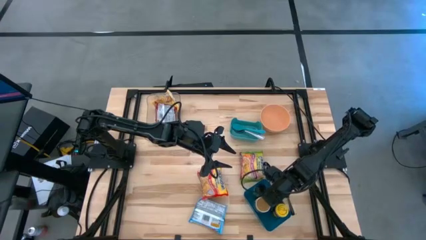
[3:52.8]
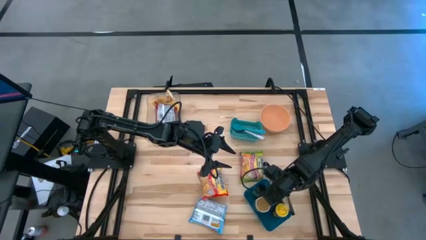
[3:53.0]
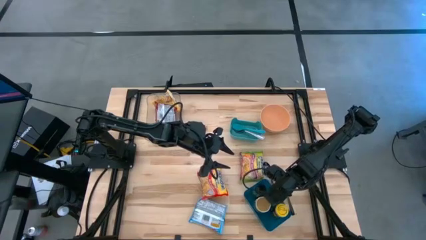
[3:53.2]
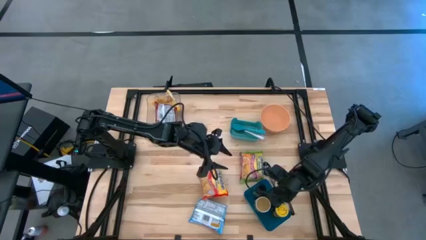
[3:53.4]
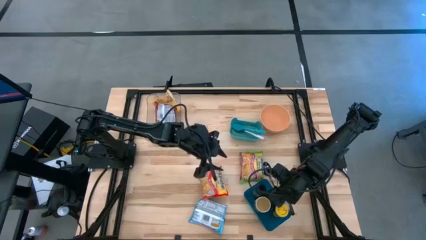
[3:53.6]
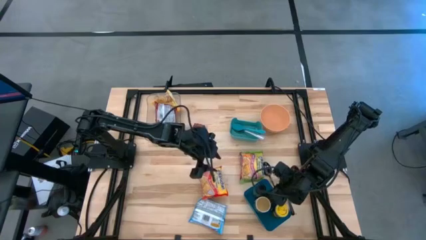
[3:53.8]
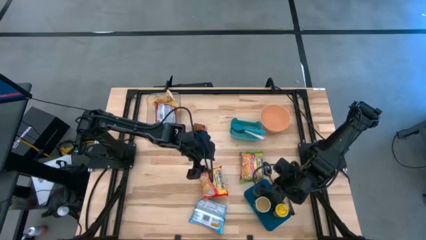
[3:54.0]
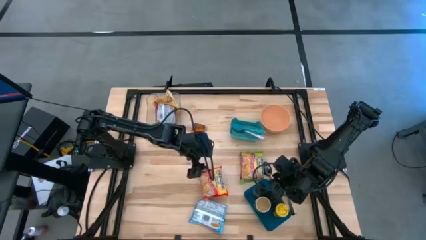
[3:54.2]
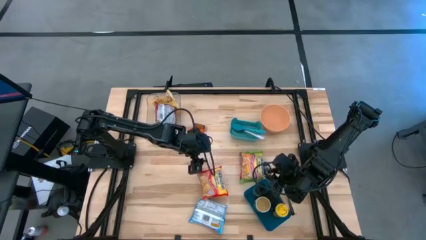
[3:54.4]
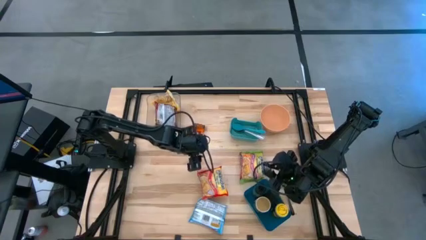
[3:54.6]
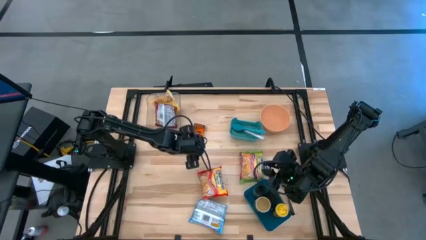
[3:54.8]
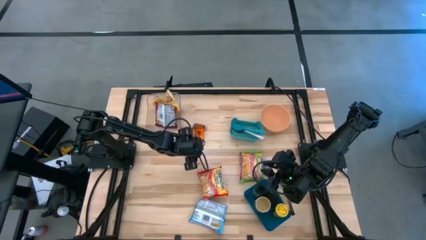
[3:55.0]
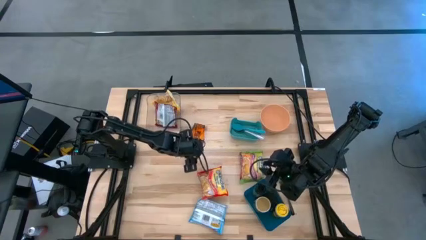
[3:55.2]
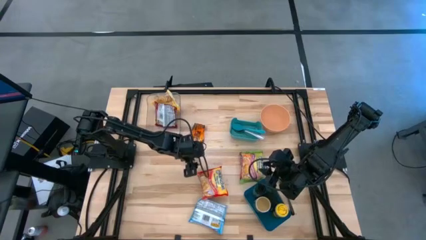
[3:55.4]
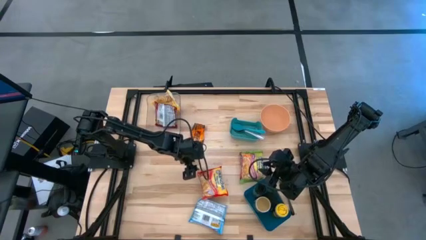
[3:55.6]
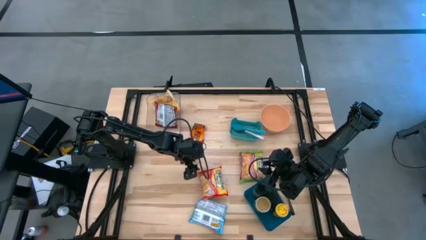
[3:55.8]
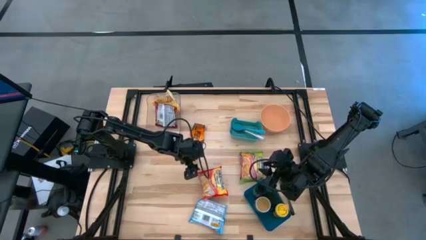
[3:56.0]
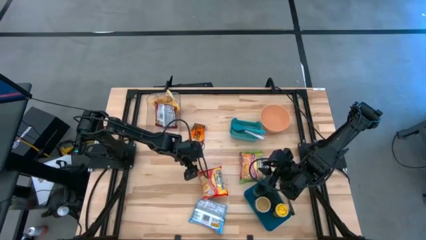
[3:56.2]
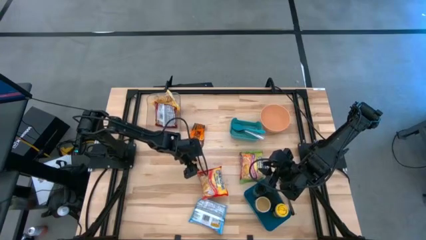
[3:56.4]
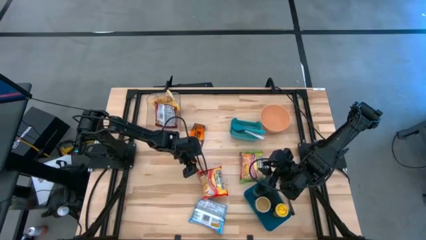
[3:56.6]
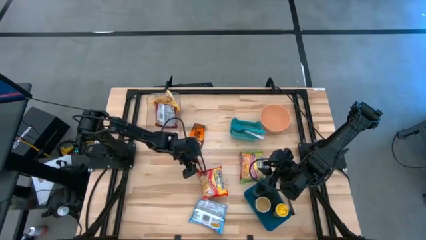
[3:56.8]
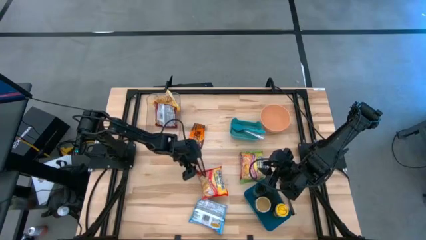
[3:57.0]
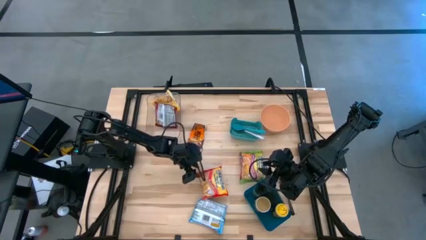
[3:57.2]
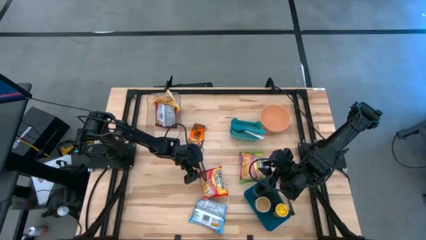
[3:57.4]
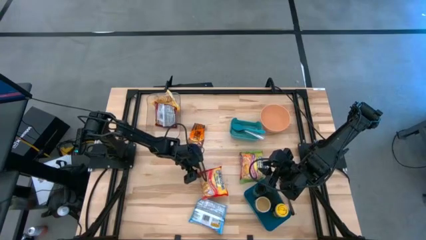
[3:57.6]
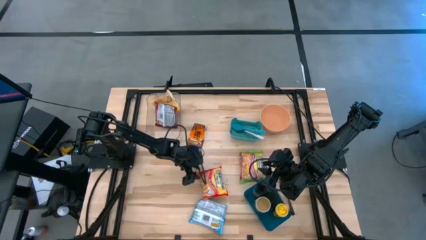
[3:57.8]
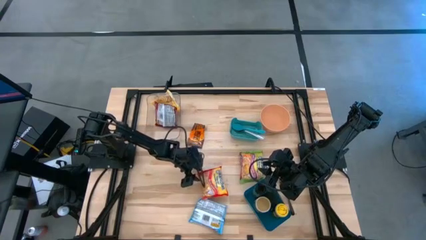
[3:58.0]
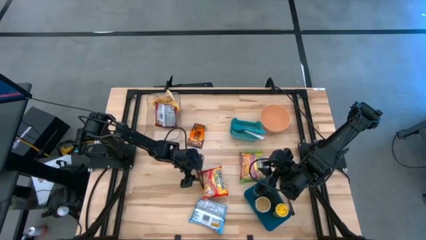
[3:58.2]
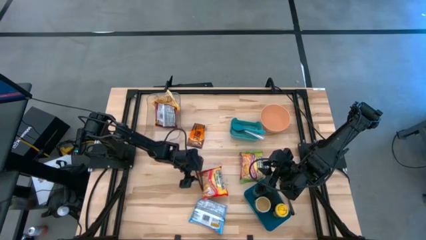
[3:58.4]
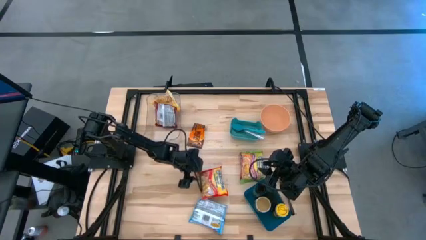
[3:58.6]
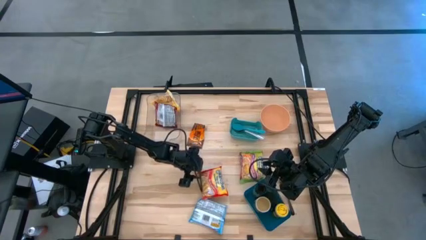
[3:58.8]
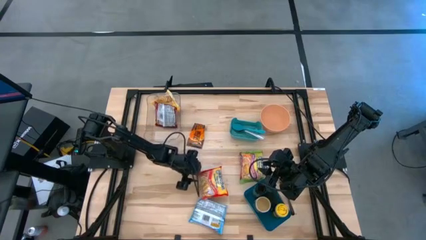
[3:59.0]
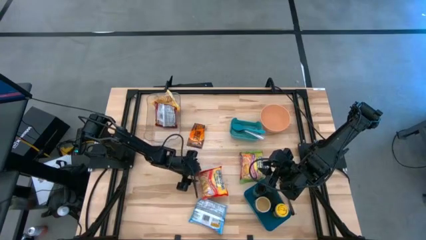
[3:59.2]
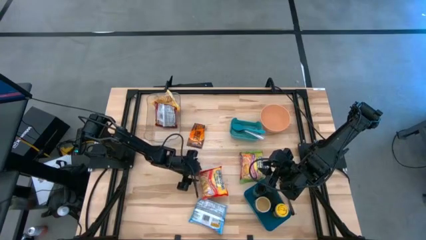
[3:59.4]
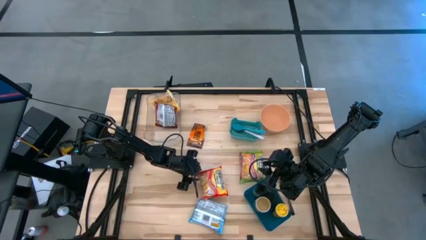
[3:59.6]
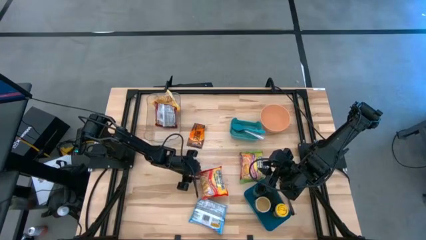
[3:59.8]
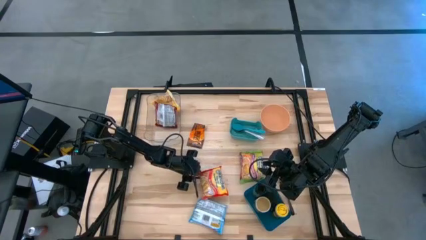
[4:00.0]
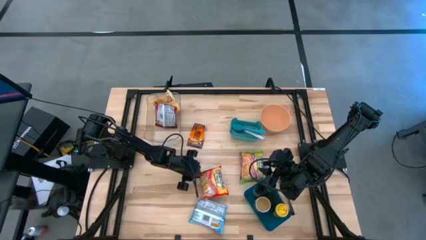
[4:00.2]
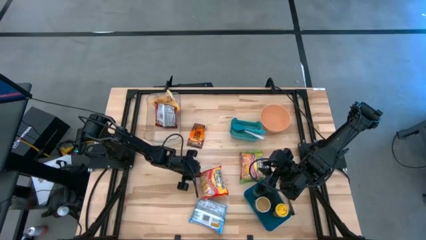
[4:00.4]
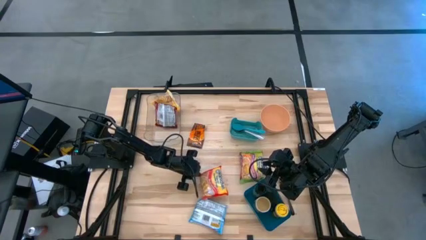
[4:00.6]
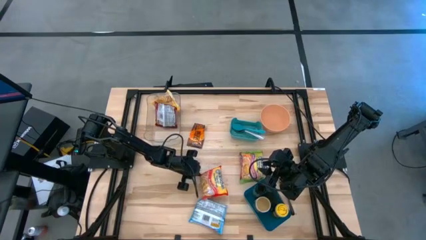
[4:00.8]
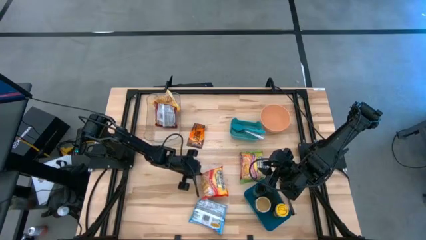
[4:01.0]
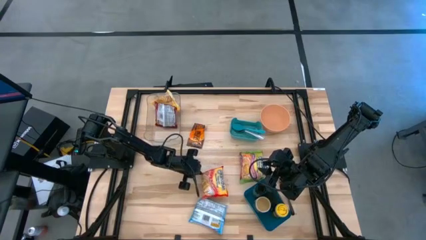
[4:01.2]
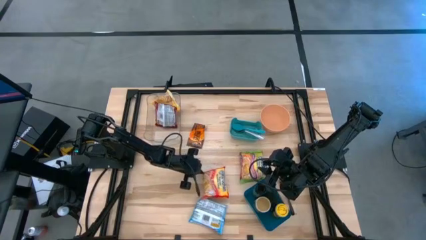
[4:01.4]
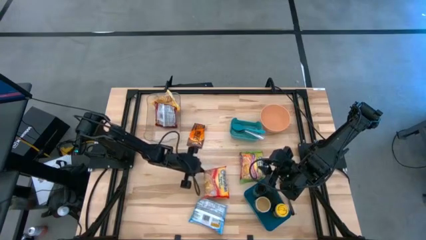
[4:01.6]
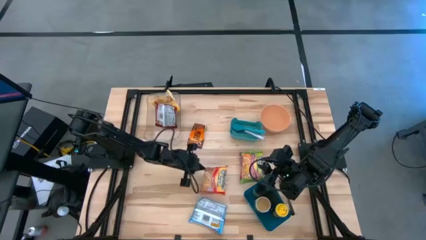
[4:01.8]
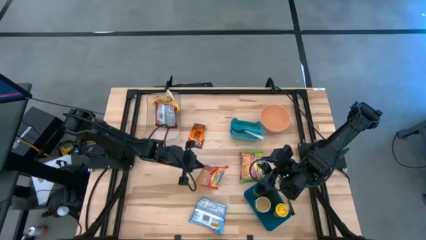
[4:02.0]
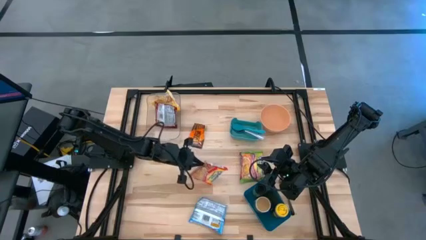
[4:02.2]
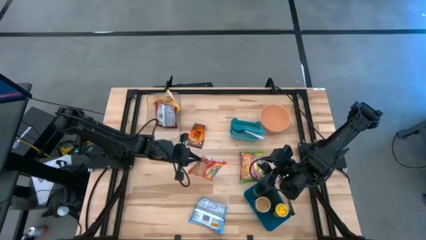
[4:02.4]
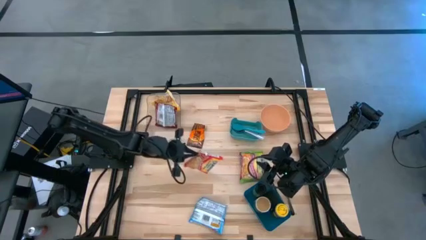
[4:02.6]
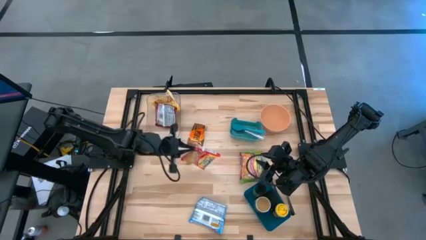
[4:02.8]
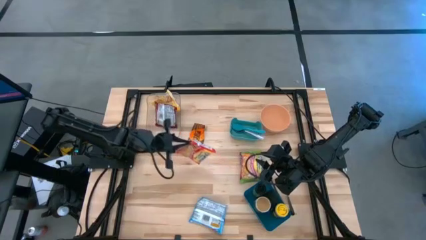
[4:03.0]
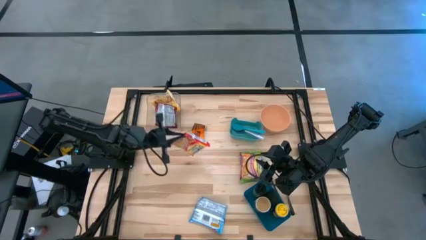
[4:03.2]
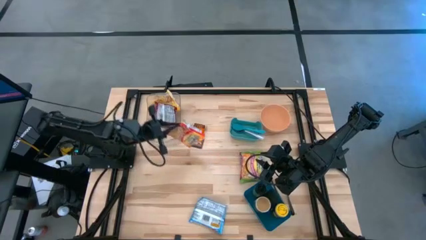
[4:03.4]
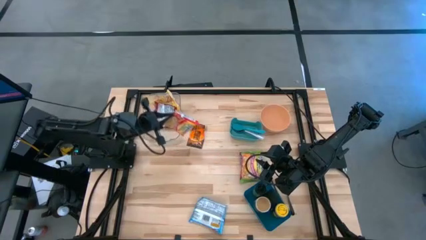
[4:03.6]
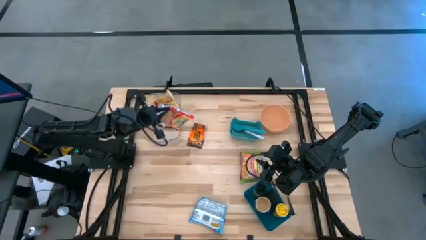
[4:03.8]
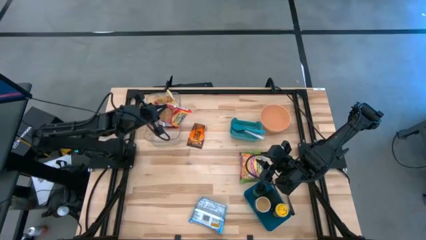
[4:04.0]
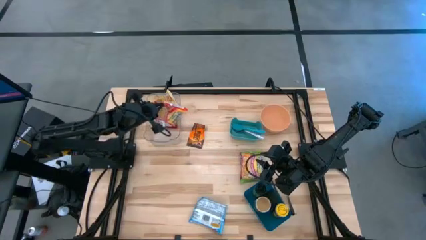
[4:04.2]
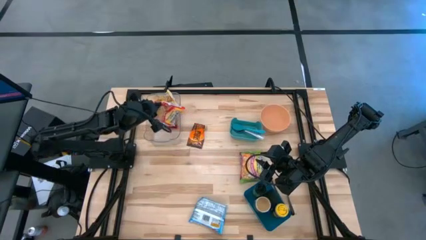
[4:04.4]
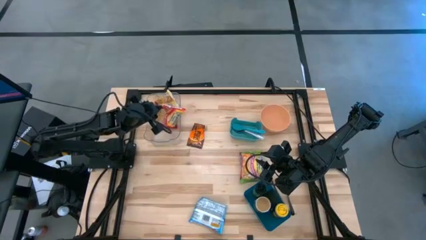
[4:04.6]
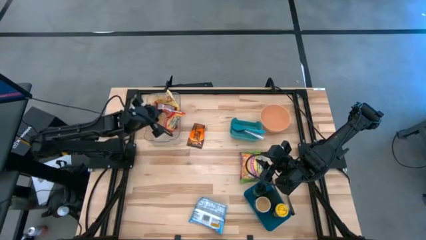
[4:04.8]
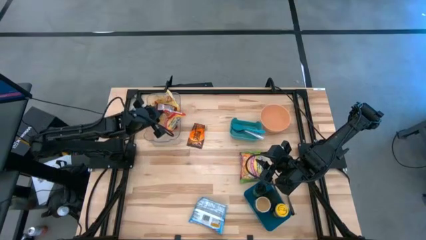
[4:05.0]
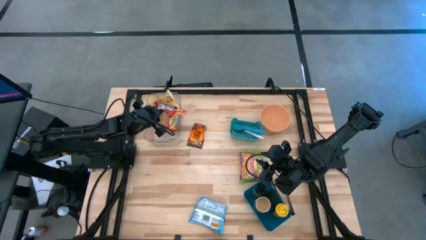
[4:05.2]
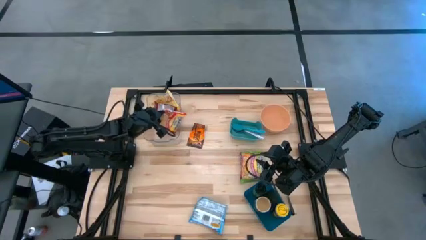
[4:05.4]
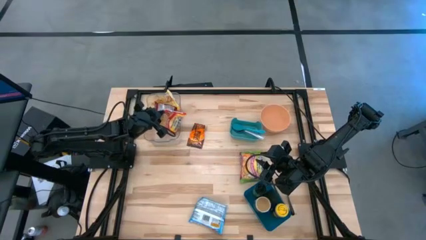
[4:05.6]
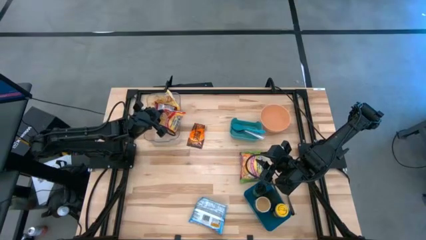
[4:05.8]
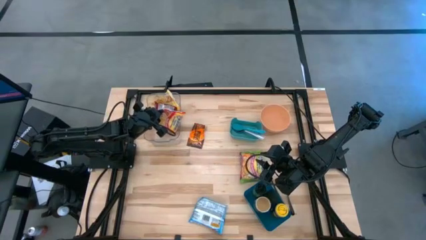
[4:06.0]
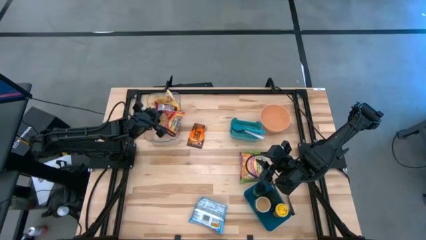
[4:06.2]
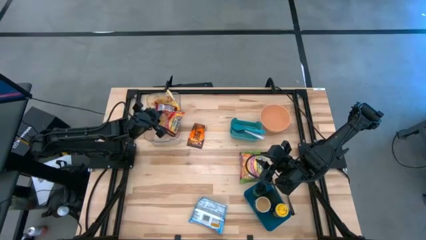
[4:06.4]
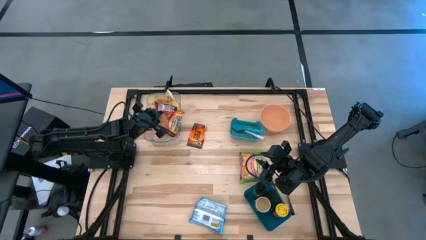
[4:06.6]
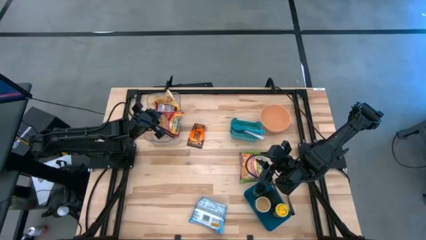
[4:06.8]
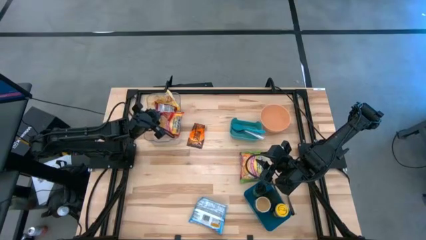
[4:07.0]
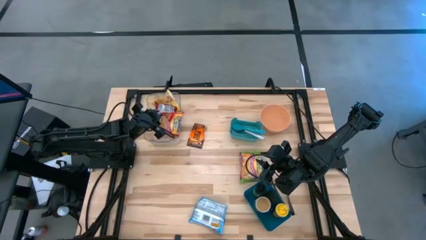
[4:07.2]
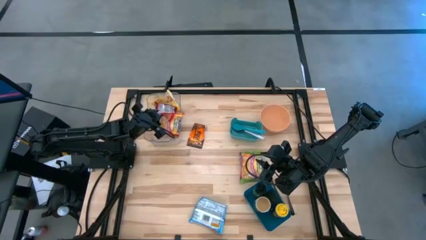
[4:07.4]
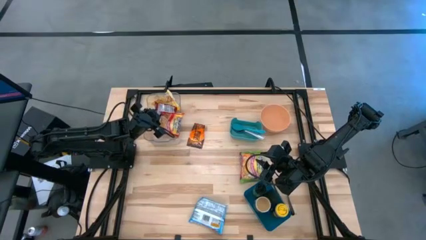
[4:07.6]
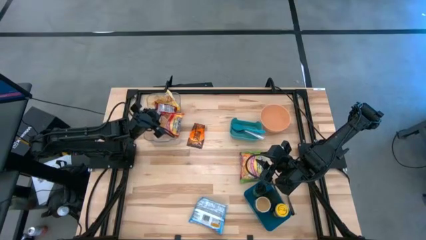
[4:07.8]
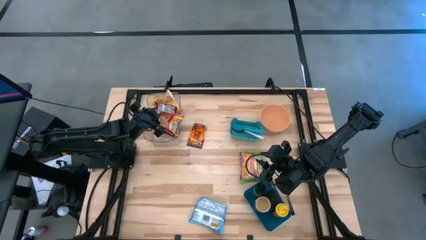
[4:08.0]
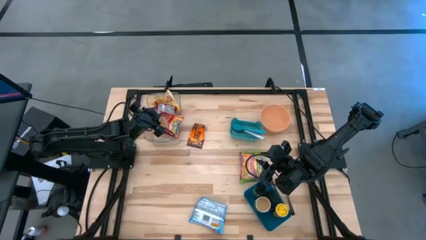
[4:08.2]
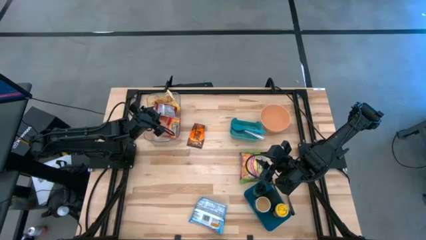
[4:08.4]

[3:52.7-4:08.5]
Task: Pick & Place Food Item
Put the orange noodle pack into the transparent bin
